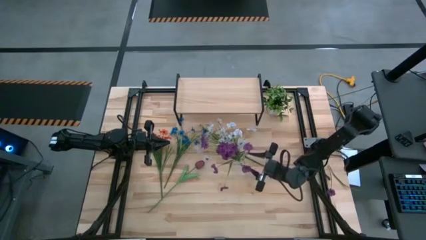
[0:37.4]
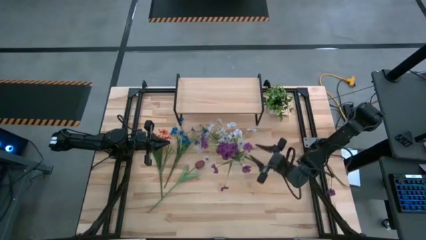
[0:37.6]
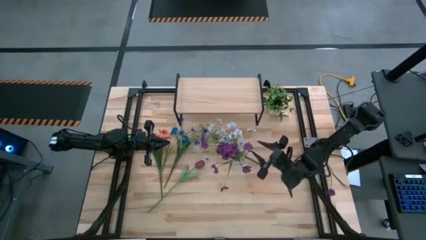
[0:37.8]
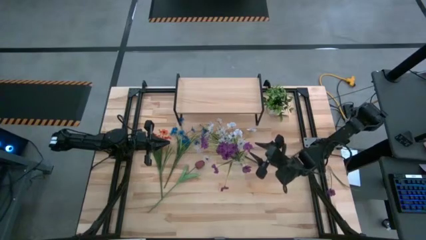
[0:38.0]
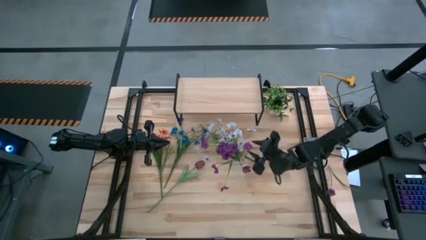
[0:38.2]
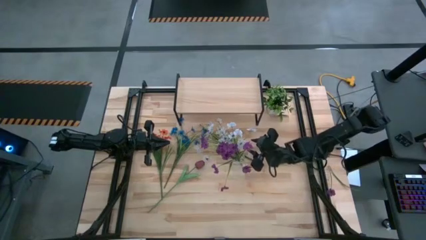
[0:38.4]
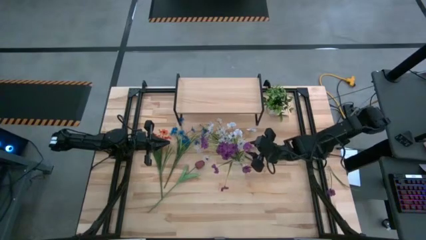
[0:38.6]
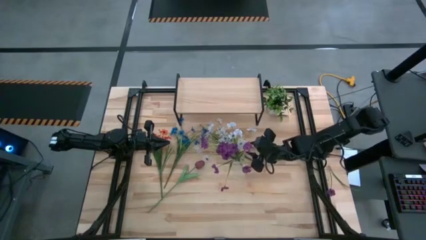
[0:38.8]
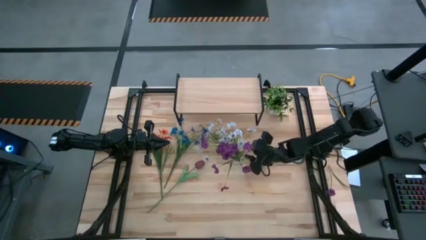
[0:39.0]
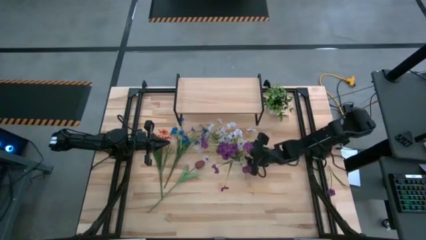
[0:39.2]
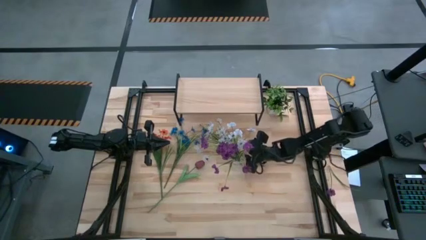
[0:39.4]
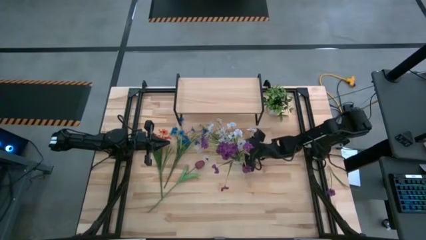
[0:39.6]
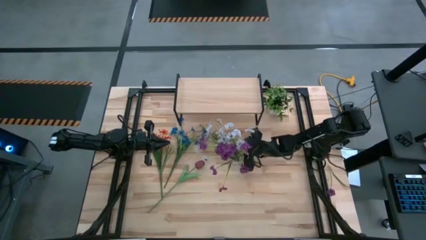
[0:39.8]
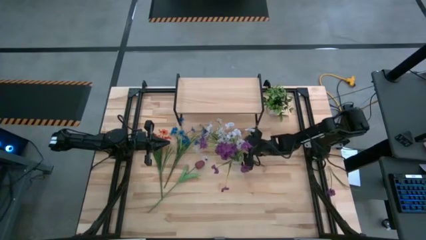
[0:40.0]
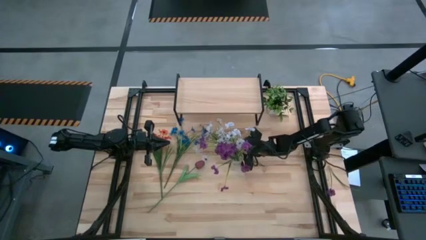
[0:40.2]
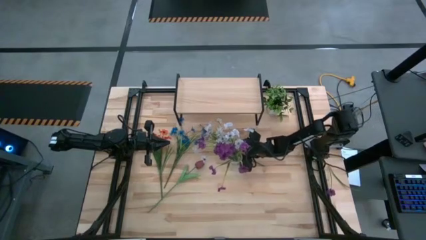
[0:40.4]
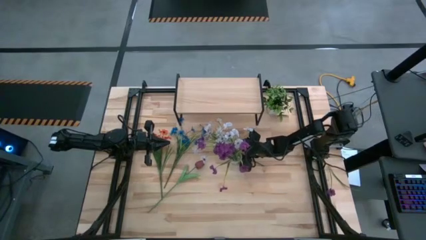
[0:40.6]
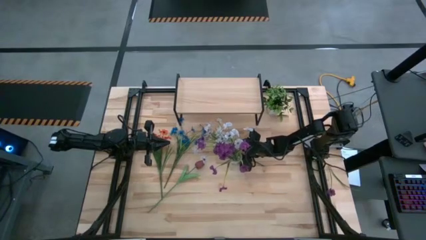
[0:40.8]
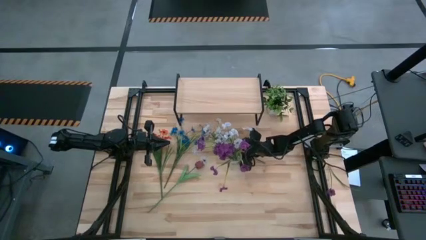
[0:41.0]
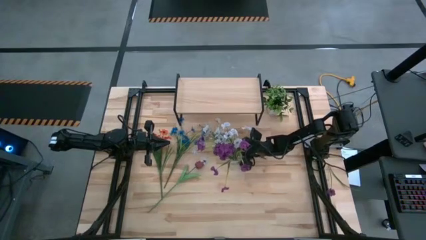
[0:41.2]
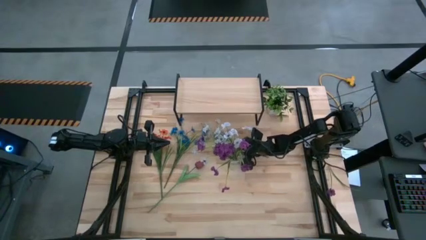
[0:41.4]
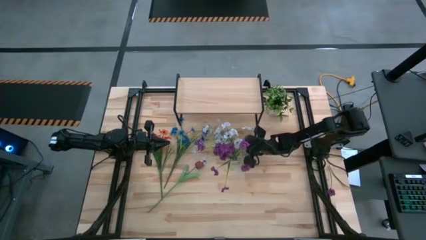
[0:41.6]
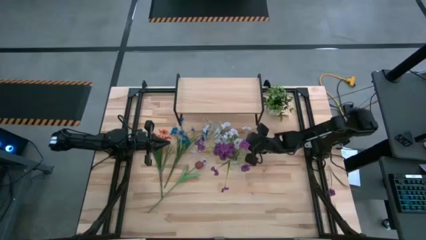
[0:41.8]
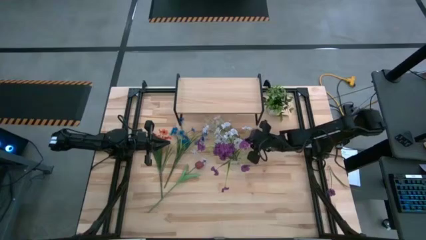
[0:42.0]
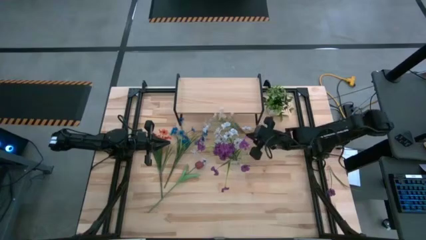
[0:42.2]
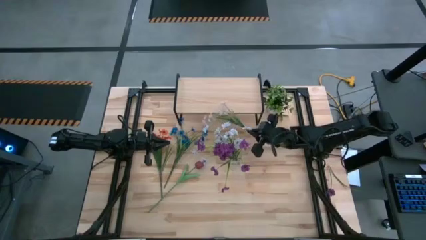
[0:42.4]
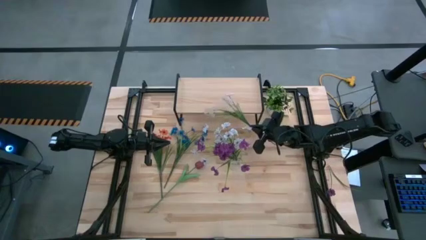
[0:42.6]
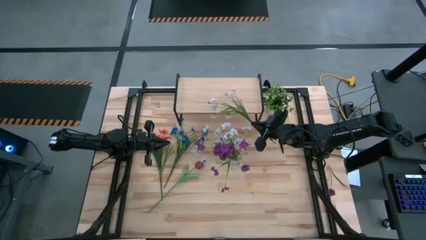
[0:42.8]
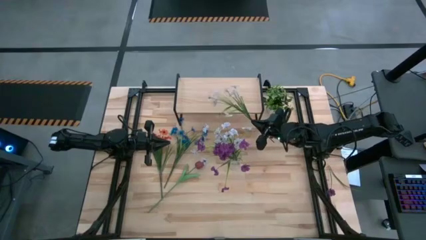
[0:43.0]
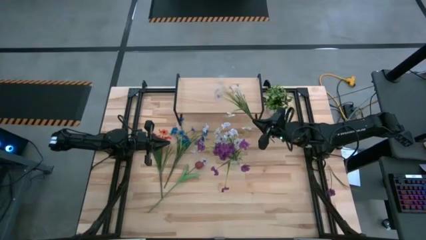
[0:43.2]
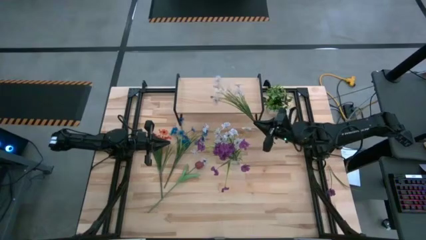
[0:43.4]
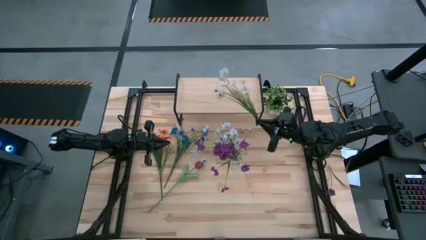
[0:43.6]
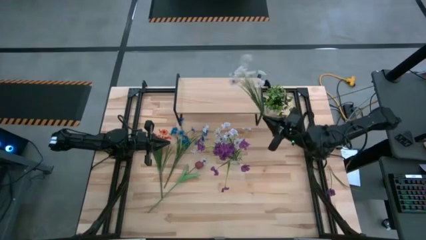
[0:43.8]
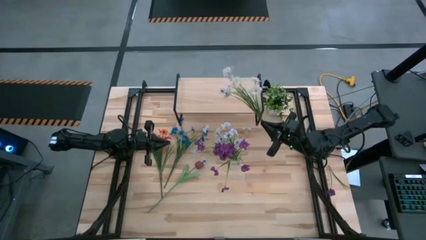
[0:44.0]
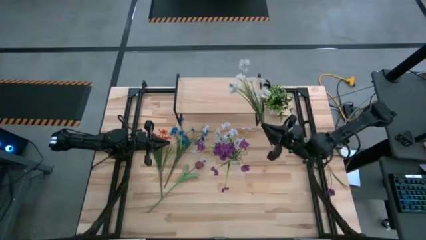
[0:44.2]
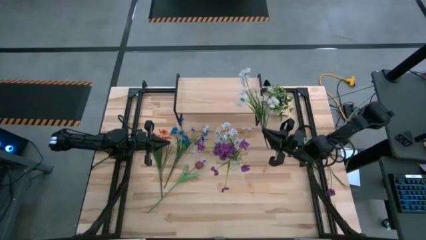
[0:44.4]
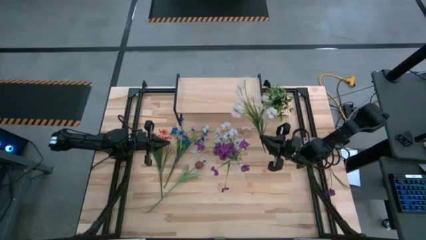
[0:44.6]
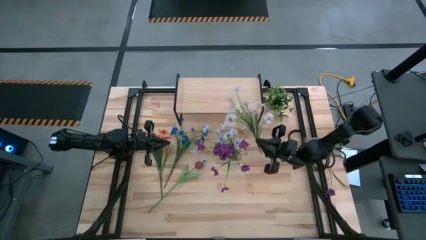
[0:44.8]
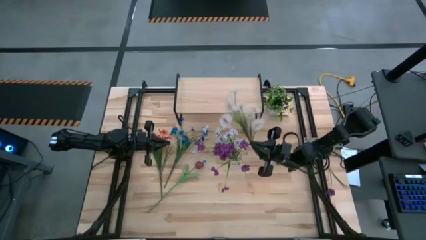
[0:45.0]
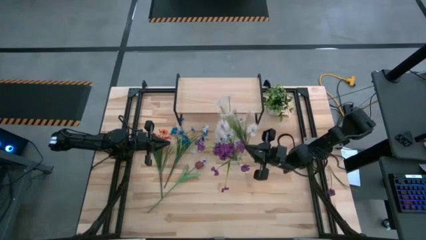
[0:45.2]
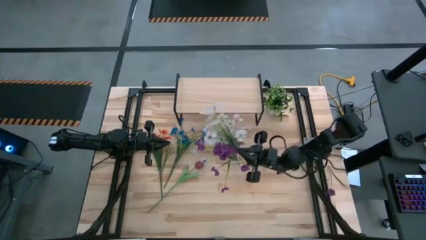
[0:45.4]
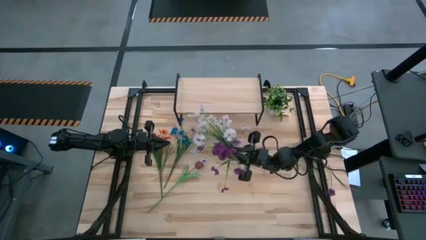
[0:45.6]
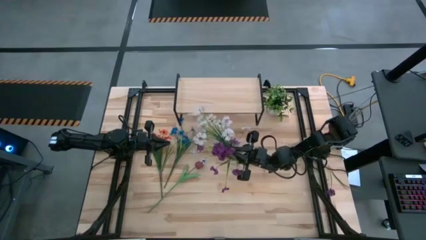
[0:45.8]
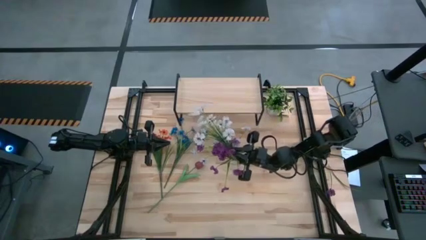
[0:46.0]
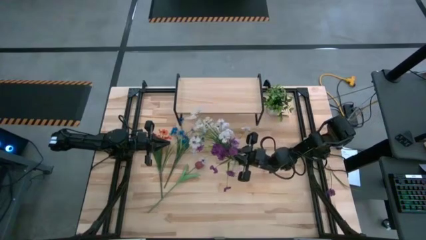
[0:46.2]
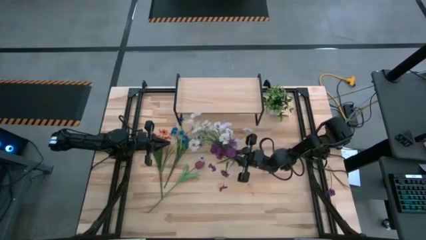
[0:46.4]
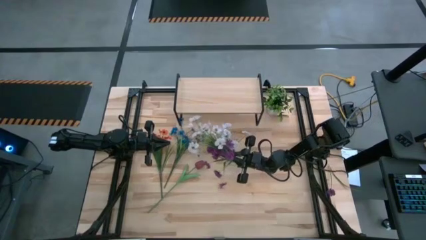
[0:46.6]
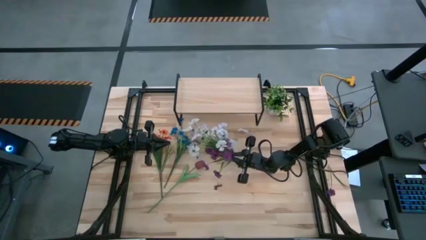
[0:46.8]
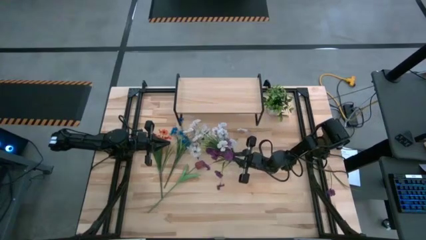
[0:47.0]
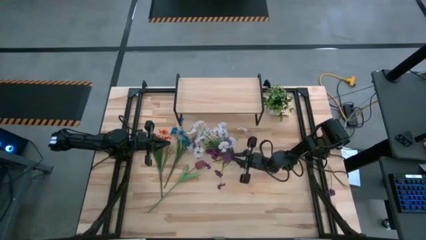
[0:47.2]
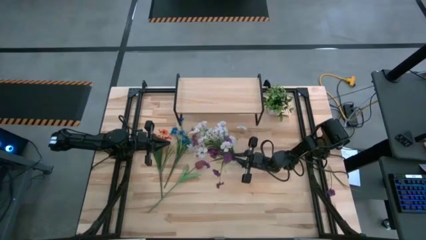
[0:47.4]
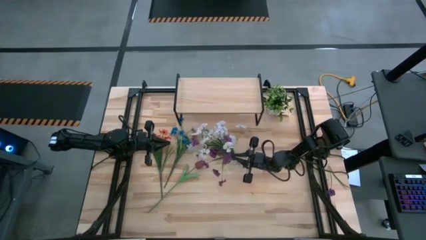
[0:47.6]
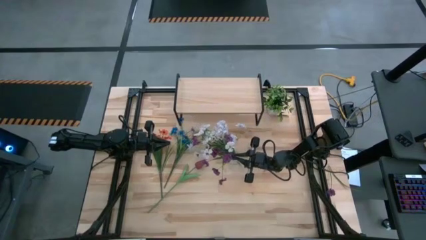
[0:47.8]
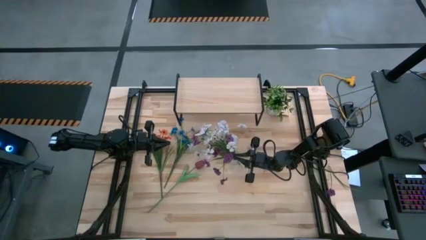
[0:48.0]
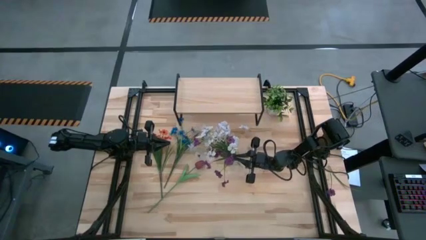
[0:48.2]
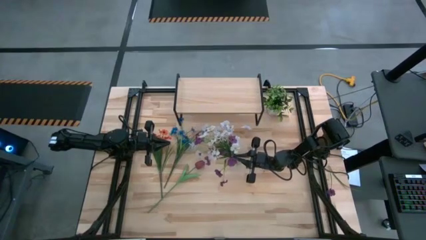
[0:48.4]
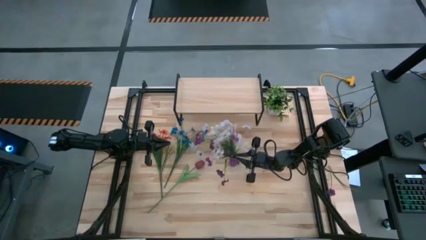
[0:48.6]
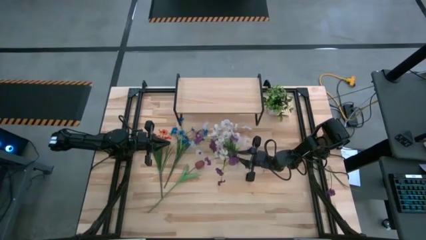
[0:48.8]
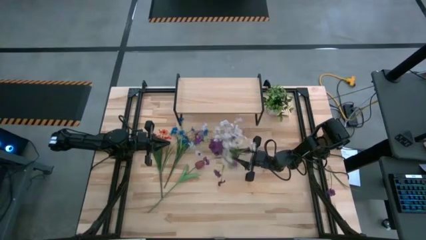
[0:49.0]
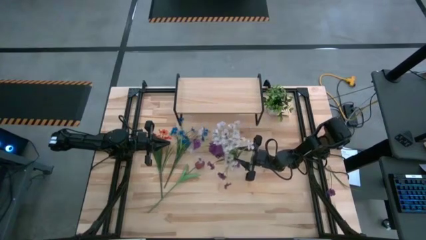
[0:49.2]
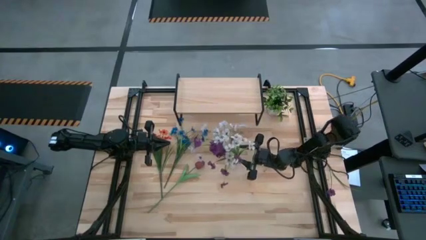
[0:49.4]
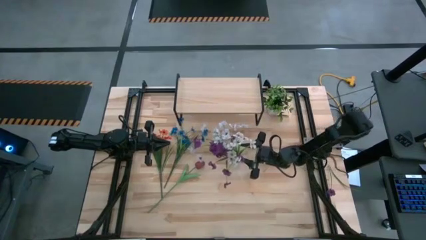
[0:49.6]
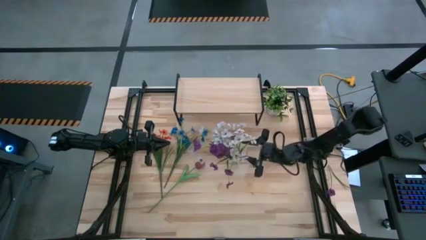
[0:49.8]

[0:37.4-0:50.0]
Task: Pick and place flowers into a vace then onto a shelf
Put the white flowers into the transparent vase

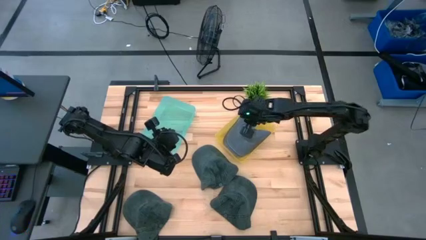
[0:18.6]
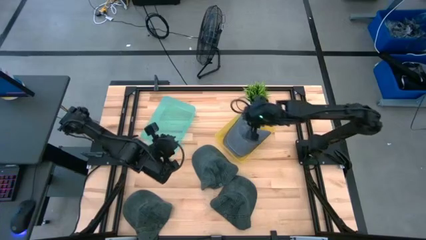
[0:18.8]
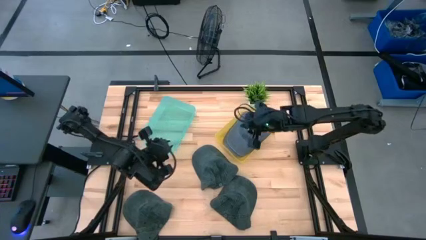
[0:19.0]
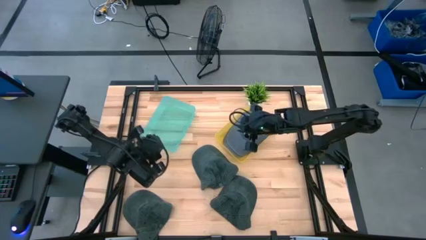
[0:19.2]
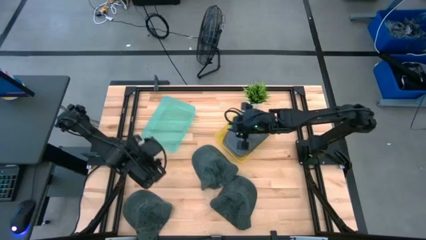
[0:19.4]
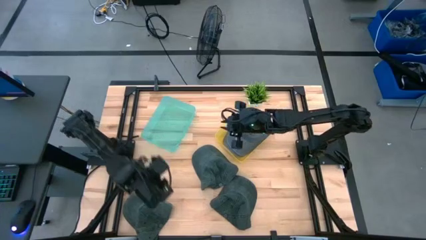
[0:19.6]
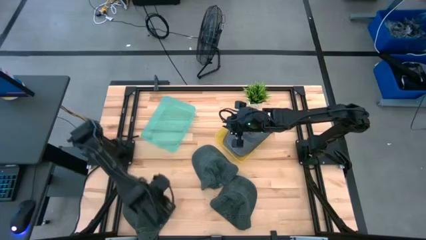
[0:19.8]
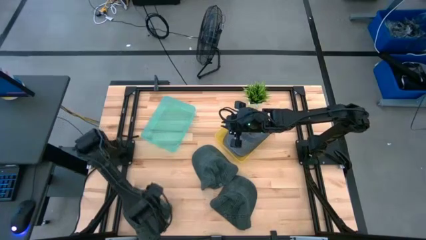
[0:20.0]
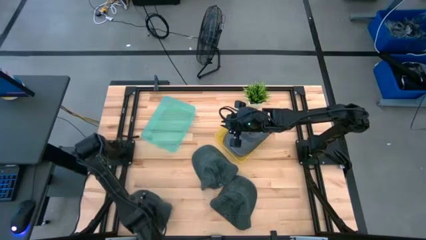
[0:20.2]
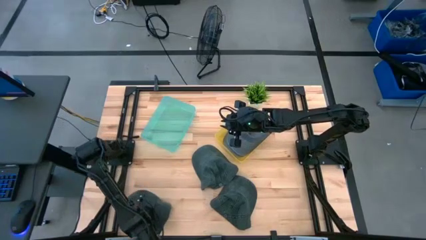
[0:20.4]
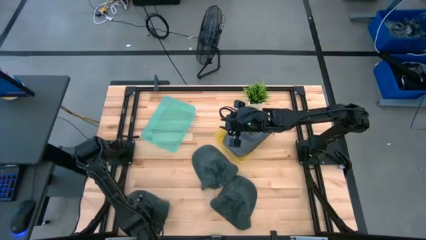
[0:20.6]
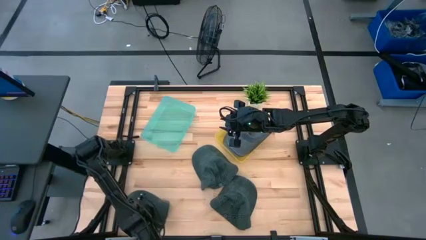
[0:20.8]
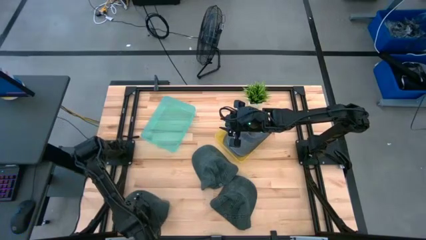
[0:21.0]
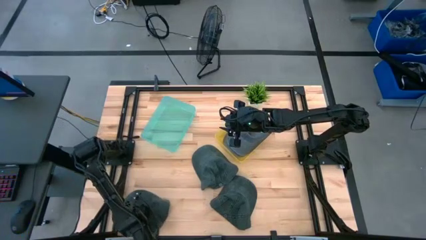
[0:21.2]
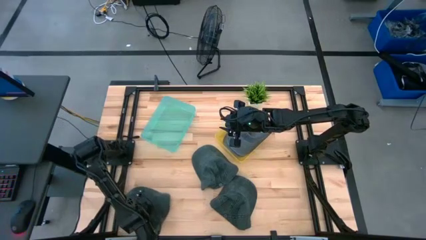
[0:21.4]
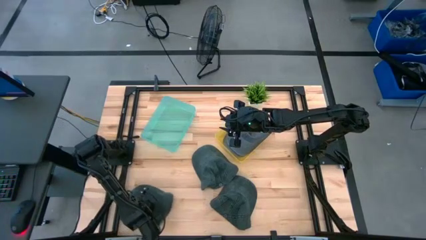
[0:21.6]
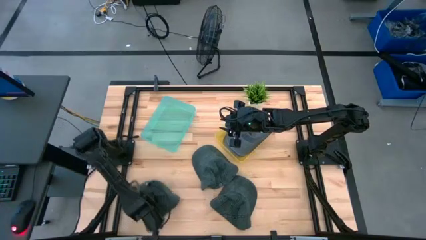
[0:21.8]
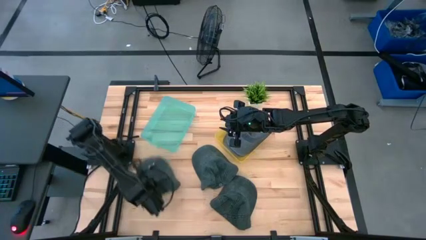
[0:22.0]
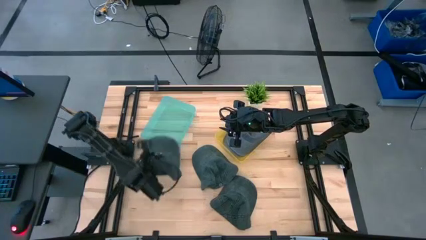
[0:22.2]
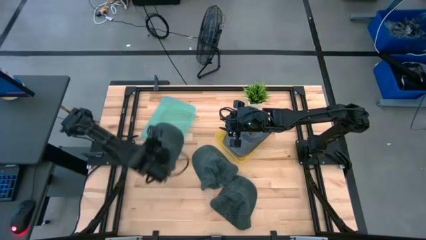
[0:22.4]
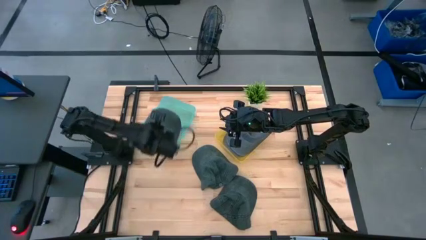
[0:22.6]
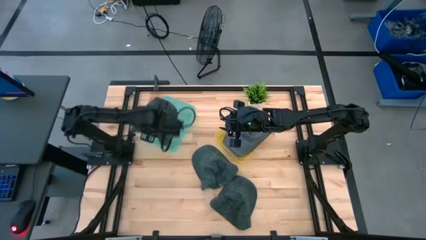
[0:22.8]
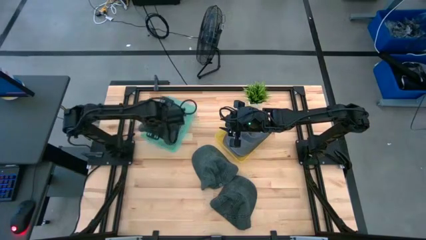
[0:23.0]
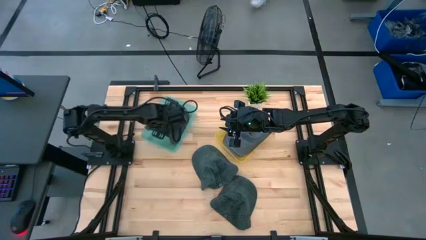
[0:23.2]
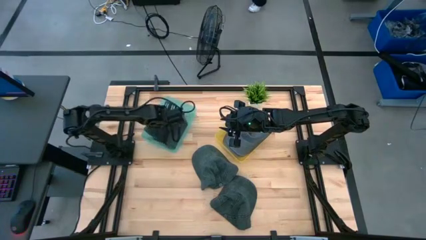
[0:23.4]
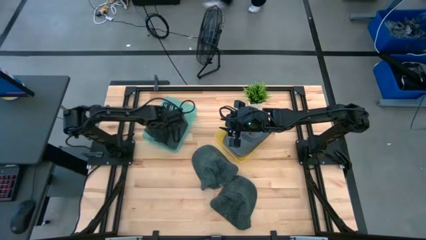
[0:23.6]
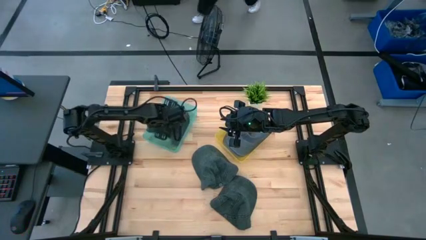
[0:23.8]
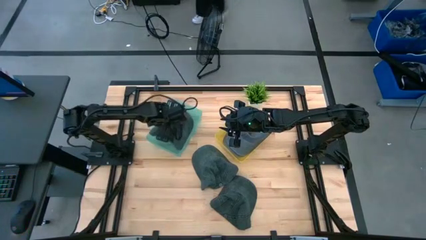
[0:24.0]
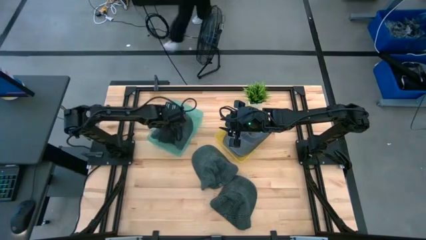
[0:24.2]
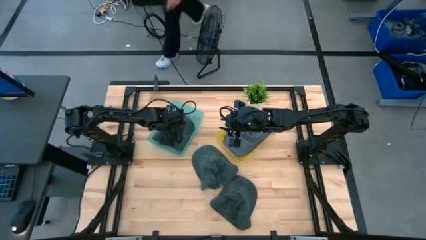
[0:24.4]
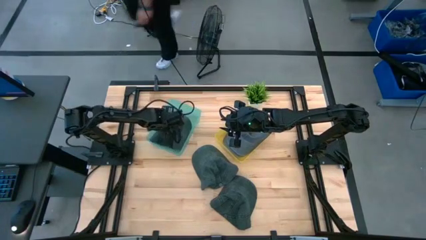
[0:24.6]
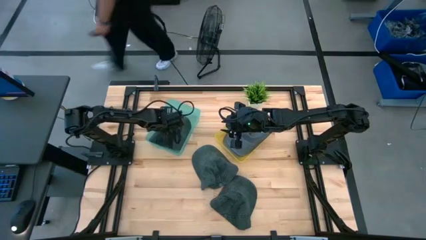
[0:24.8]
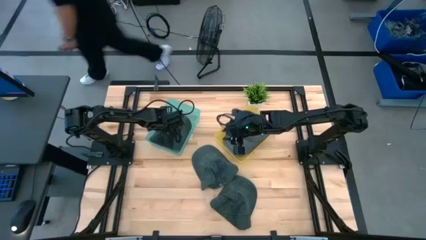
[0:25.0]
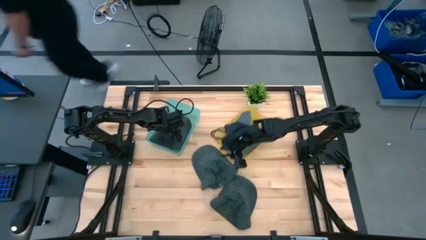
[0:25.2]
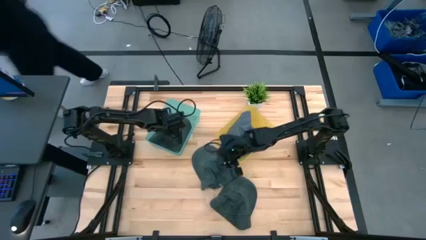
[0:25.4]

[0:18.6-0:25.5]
Task: Pick & Place hat
Put the right black cap into the blue basket
